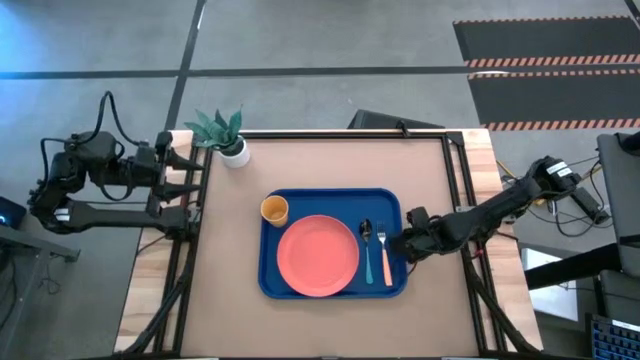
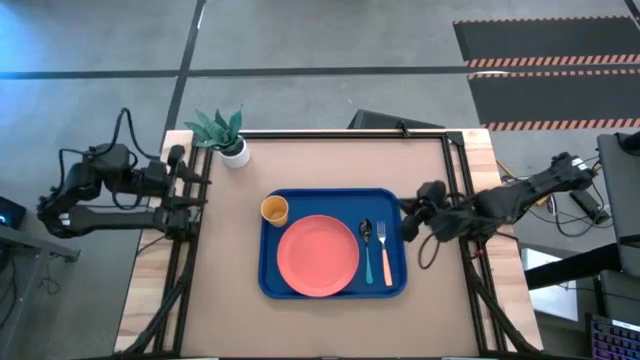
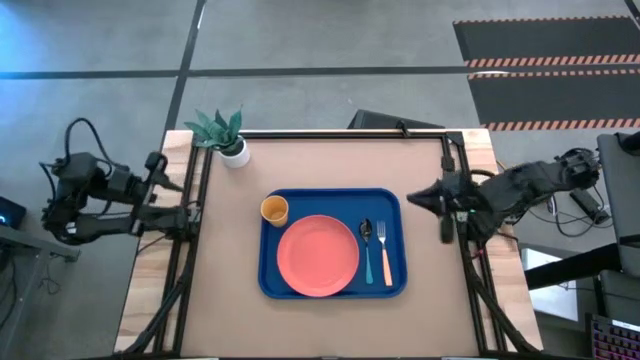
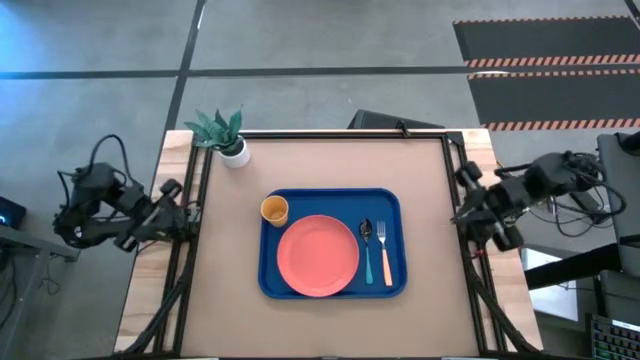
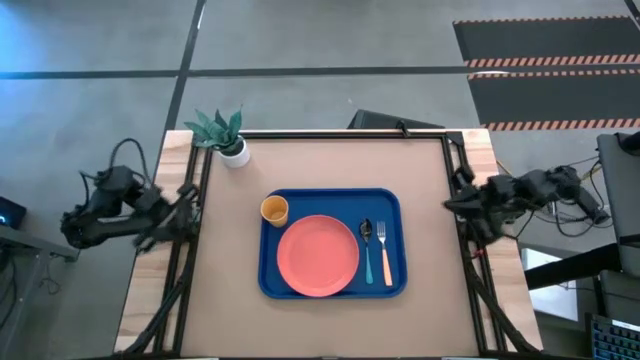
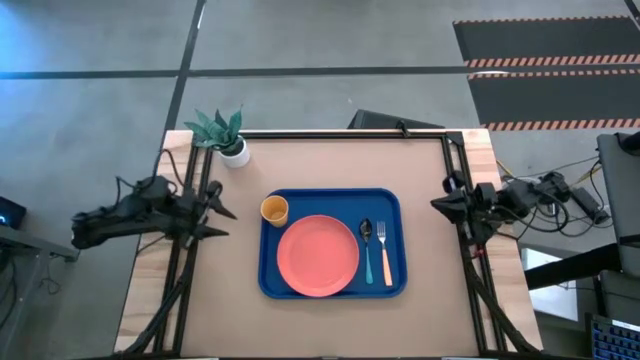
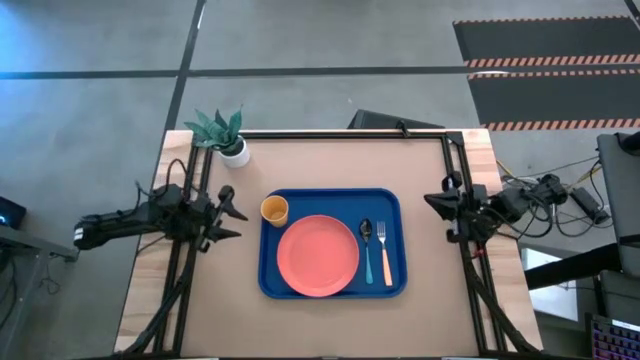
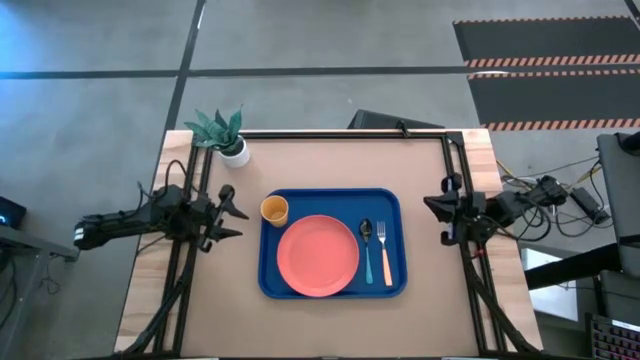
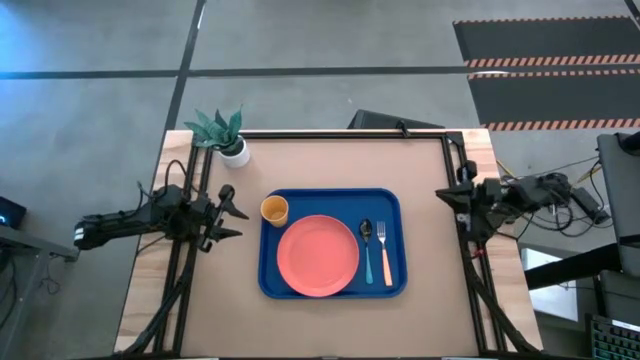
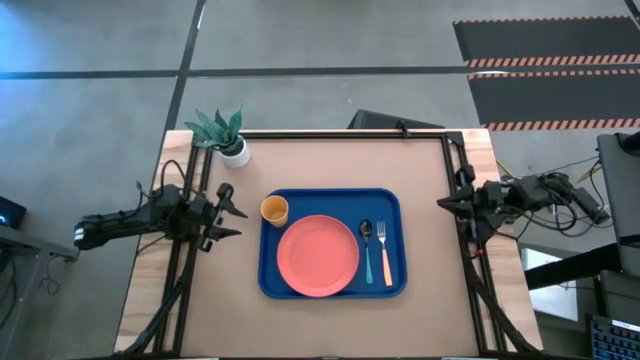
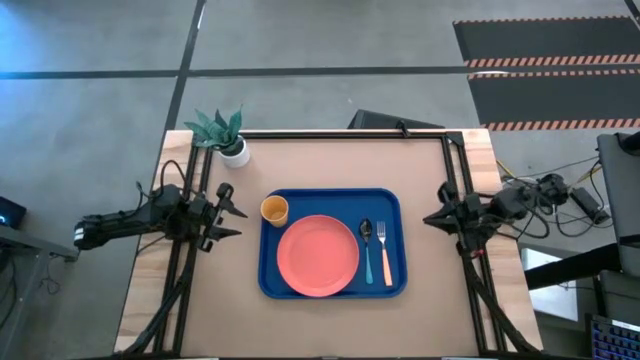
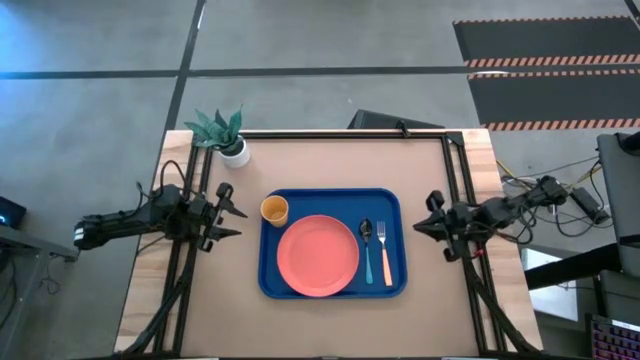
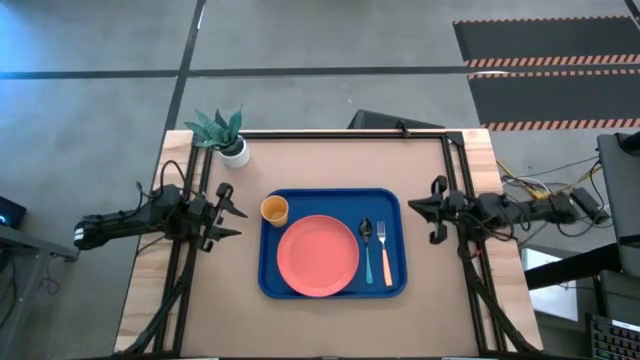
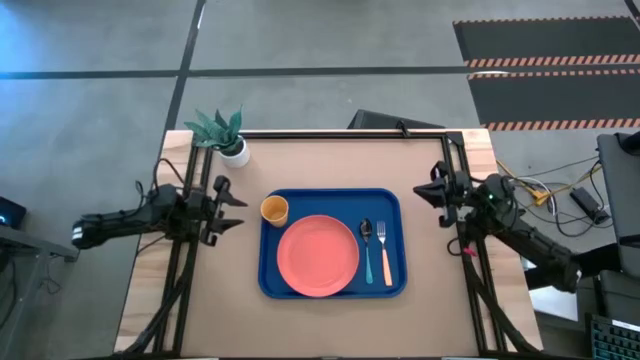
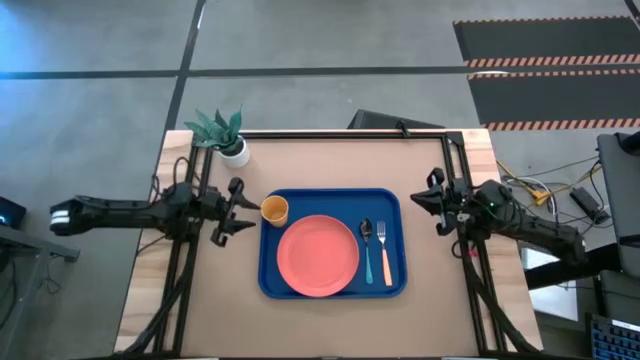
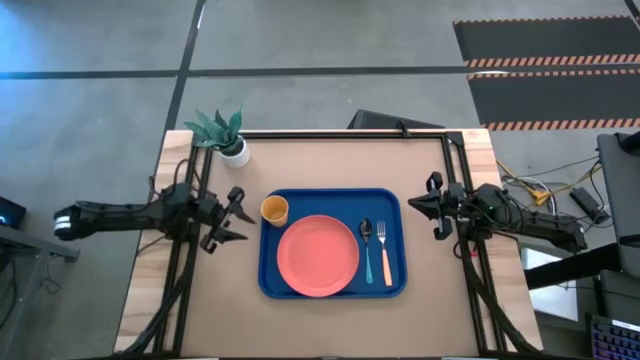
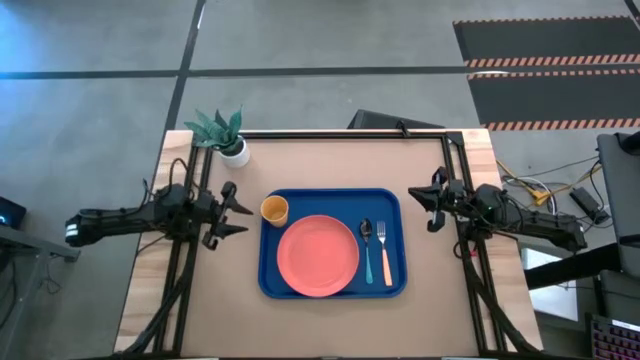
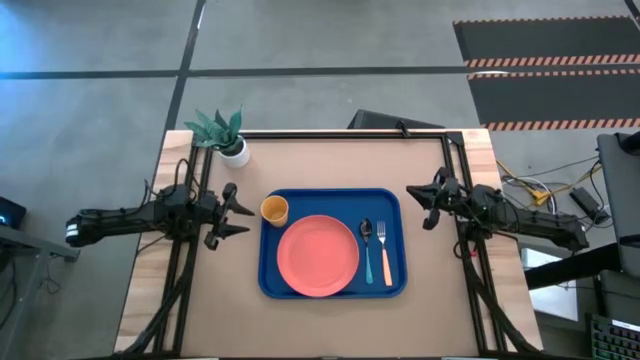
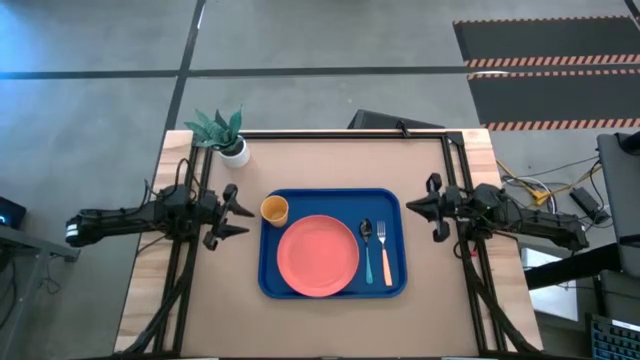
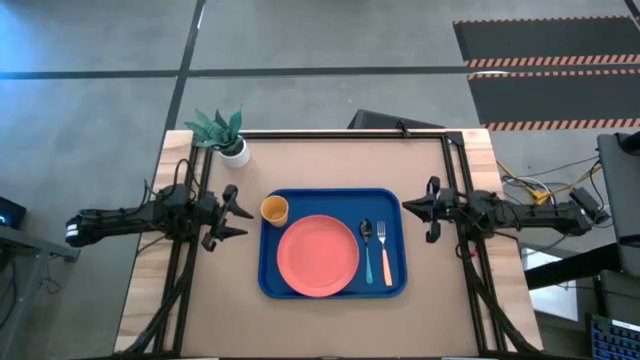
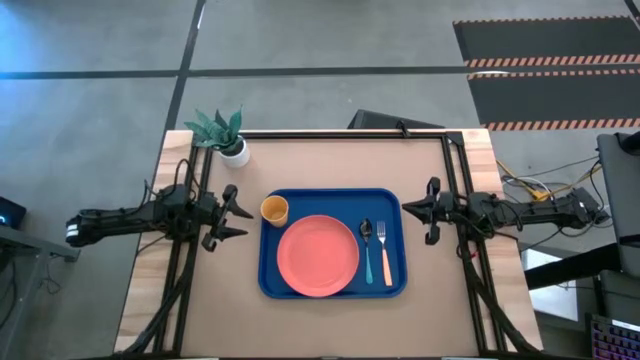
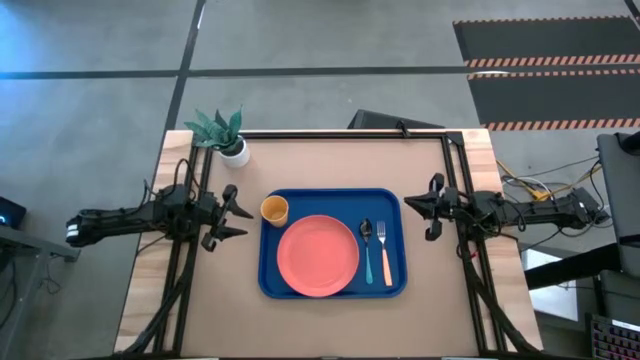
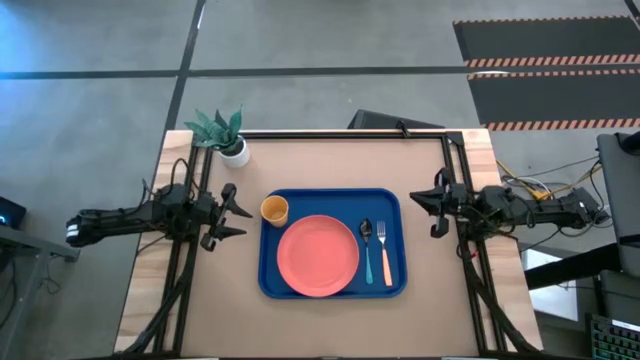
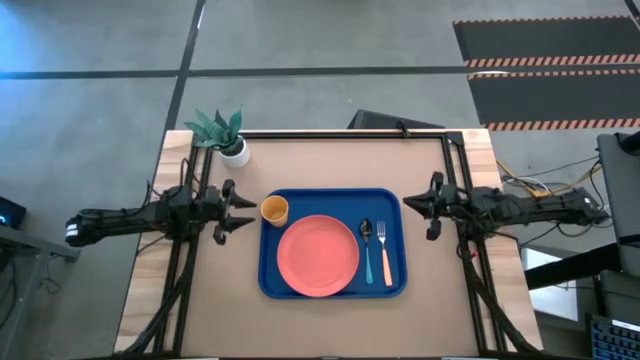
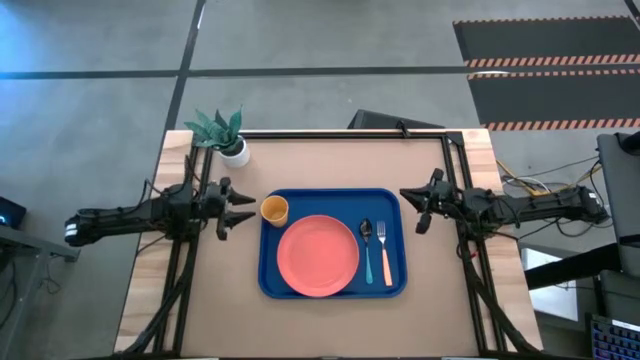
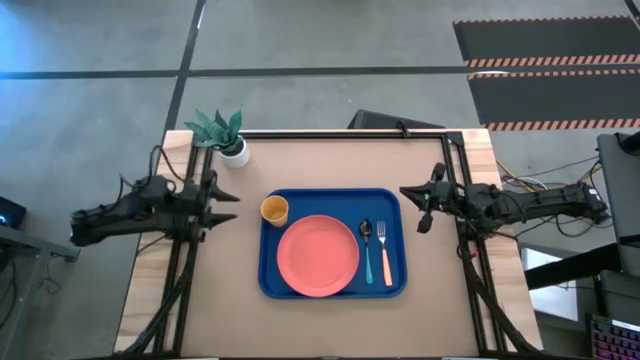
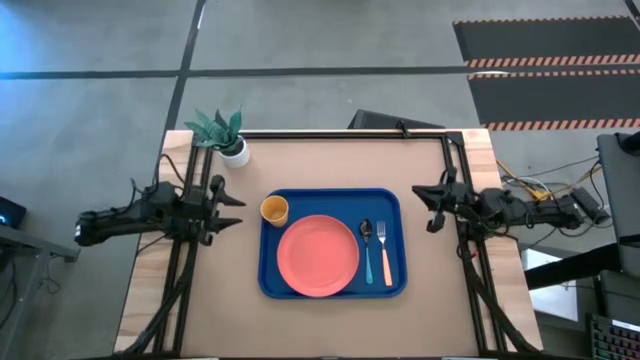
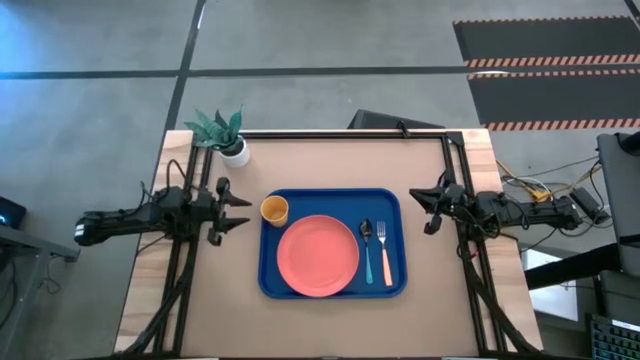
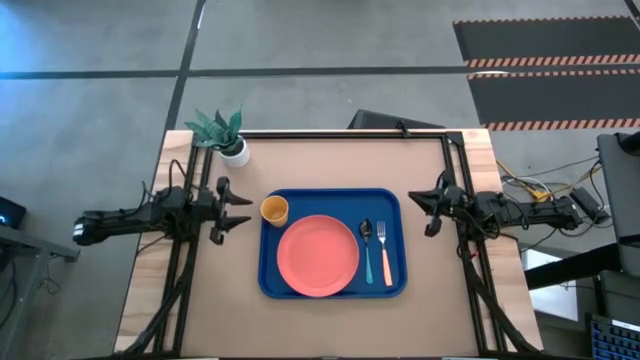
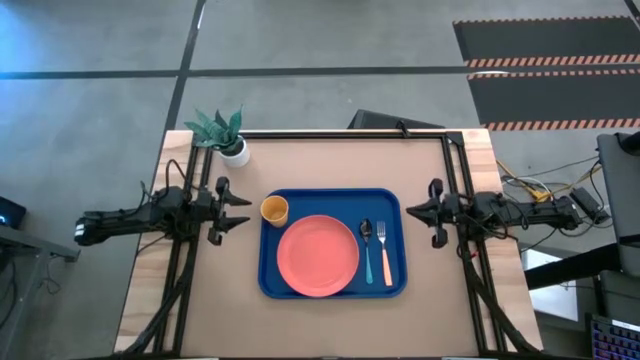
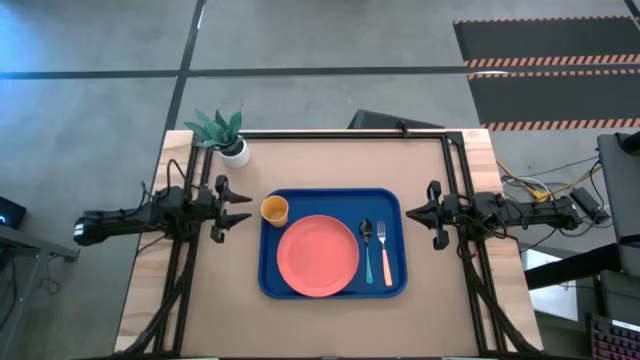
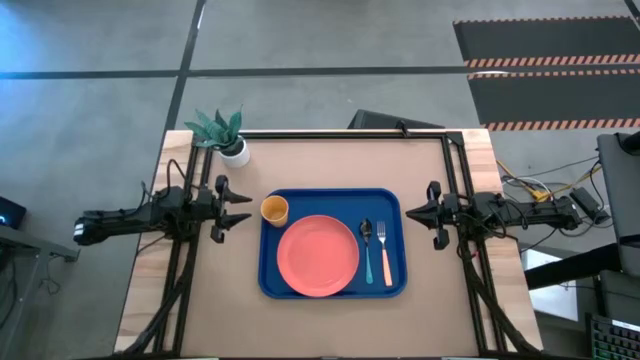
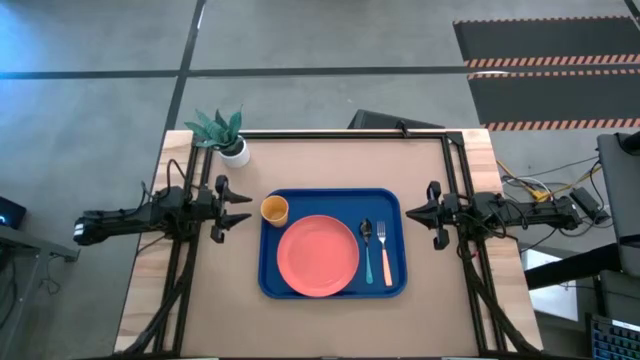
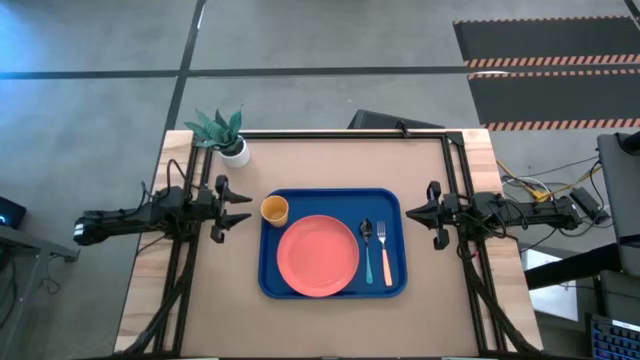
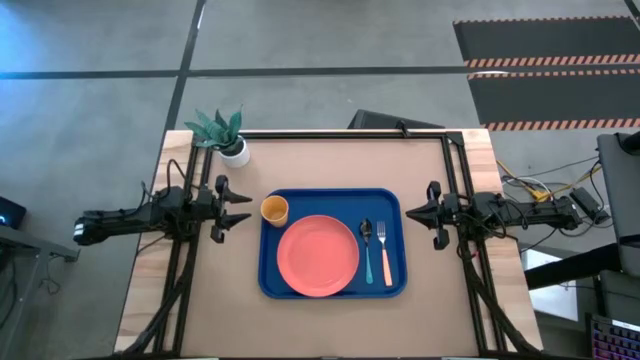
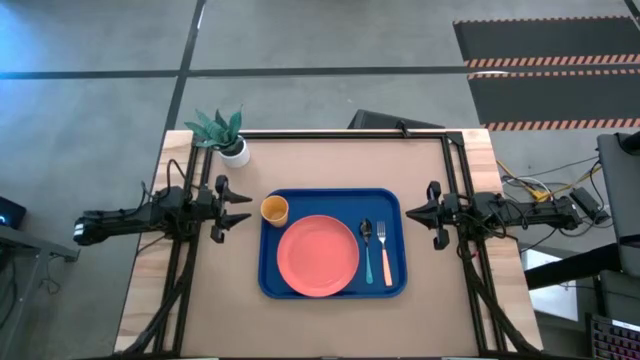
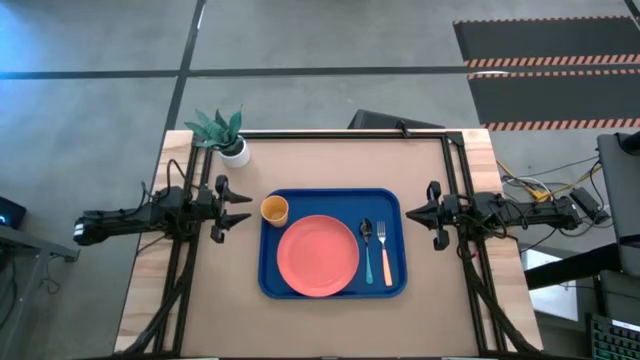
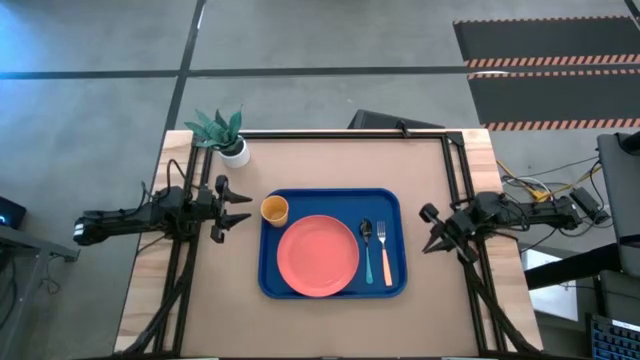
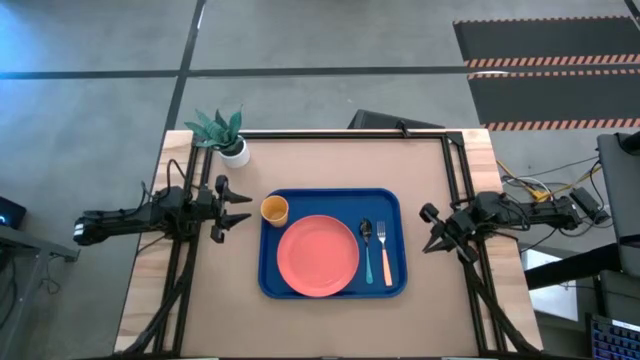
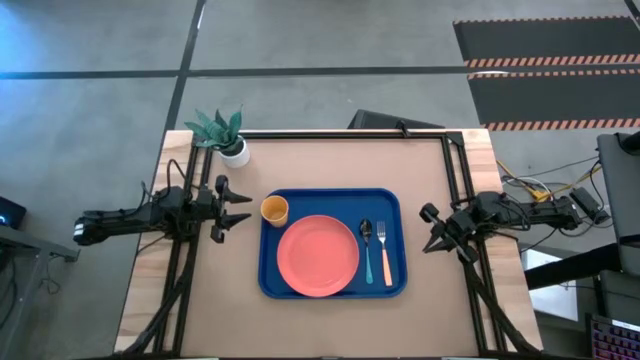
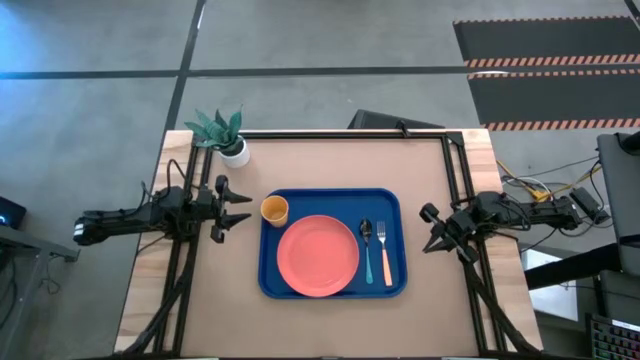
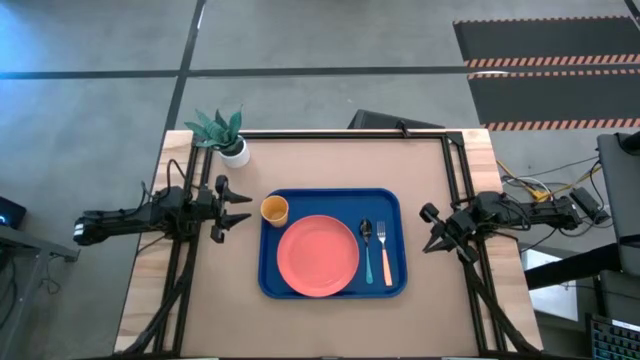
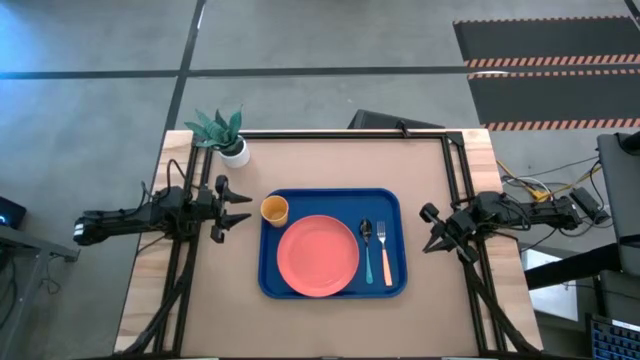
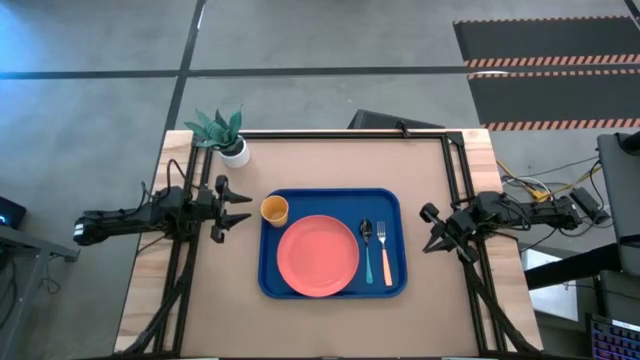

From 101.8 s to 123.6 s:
Task: Pick and place plate/cup/fork/spoon on tray
Return to Home Position
